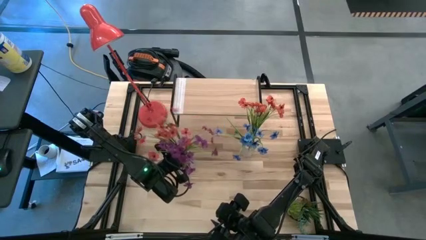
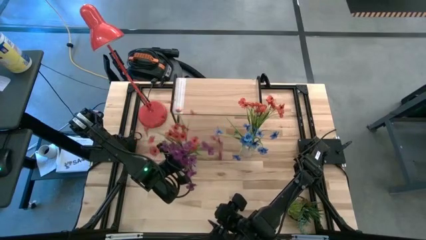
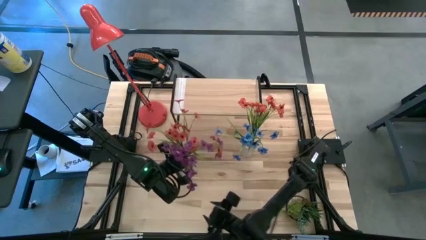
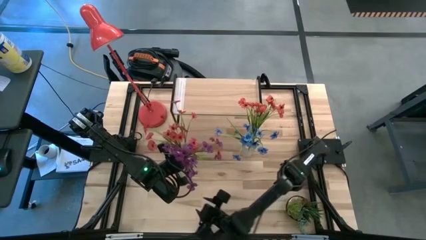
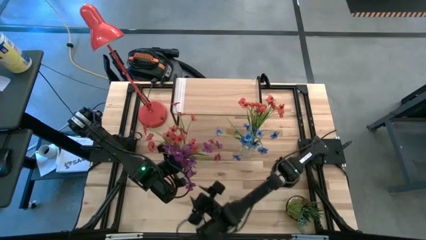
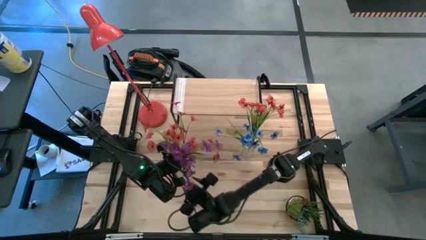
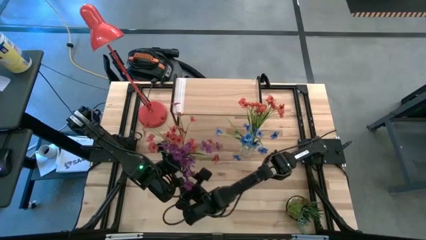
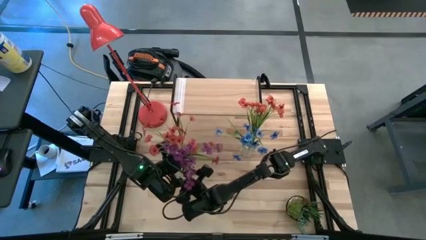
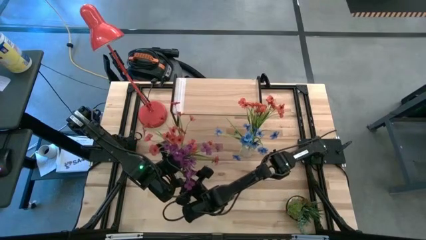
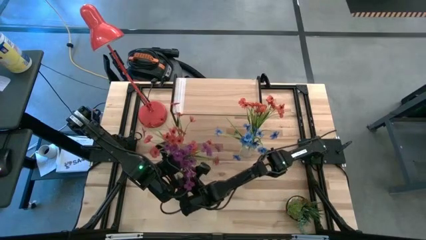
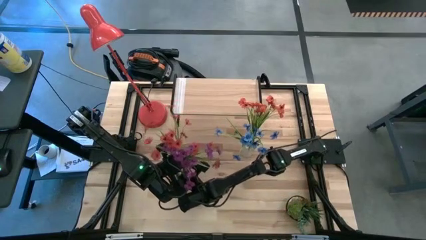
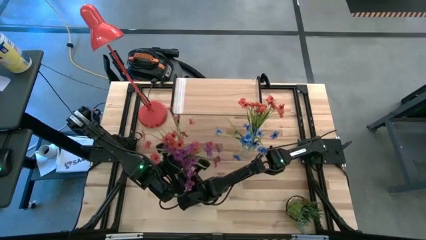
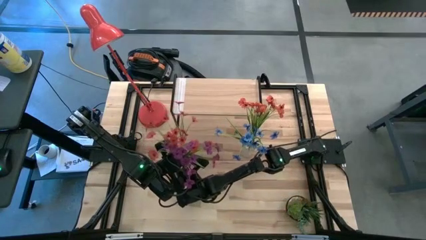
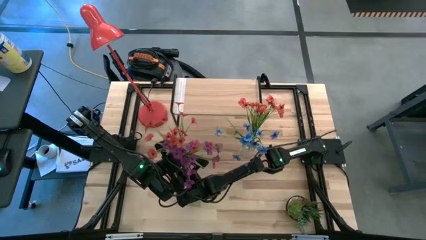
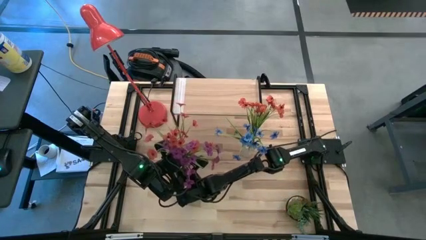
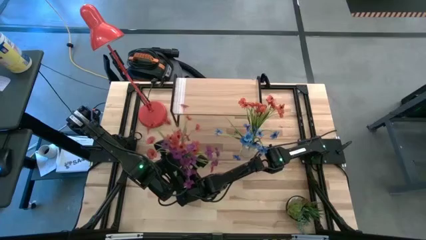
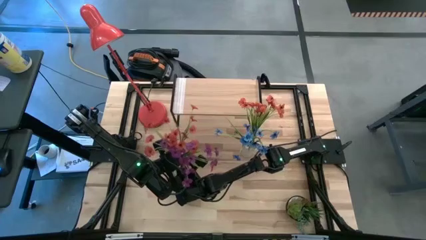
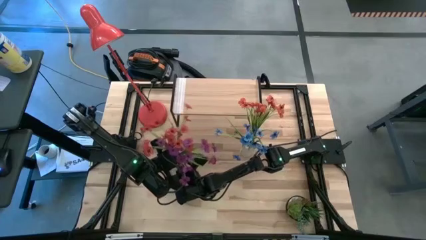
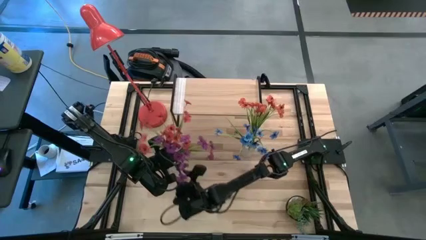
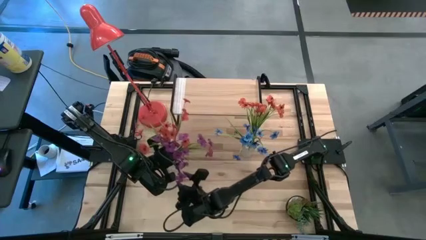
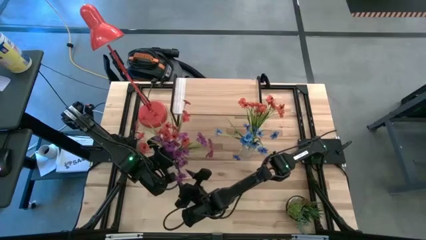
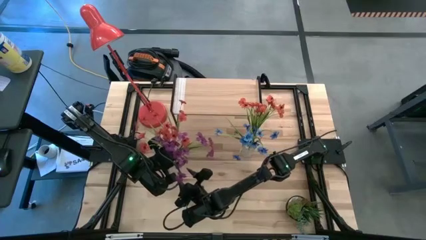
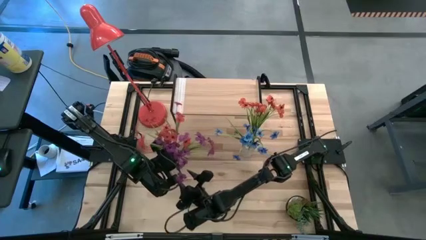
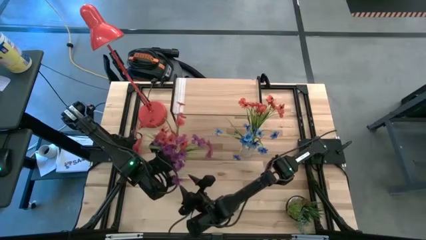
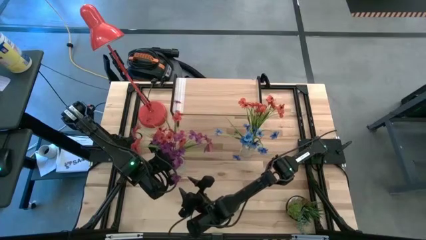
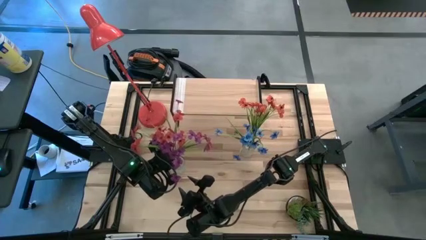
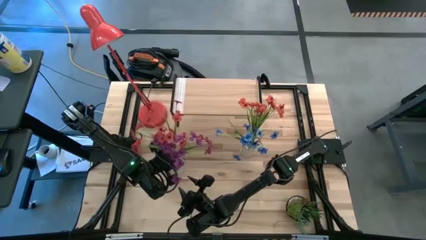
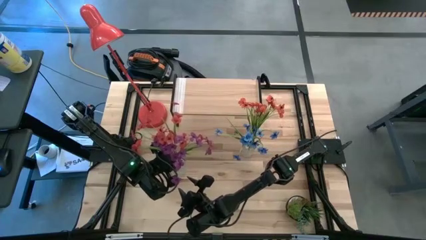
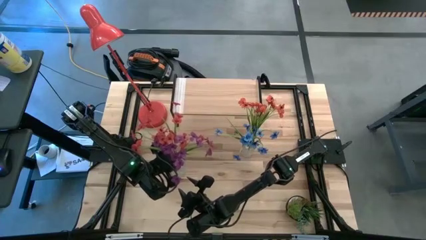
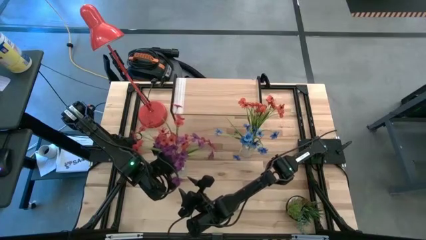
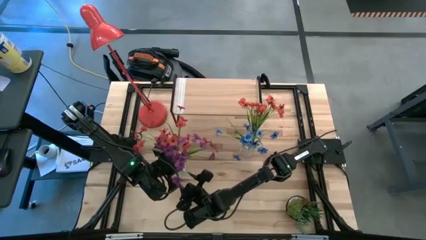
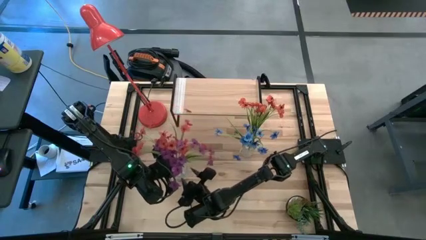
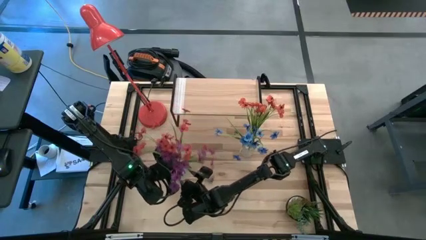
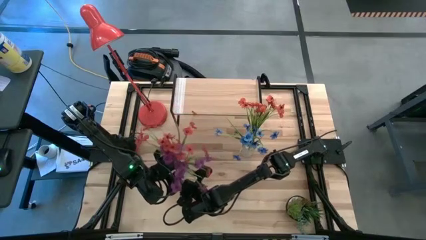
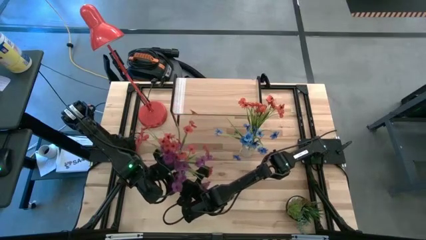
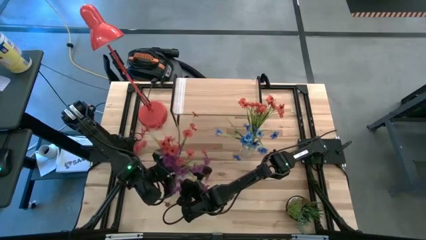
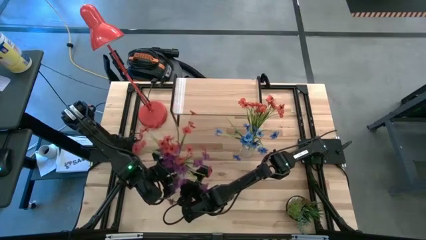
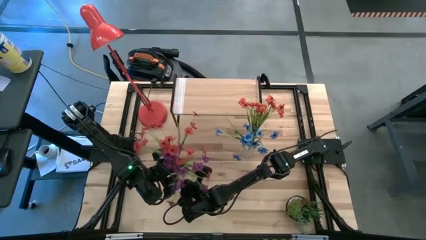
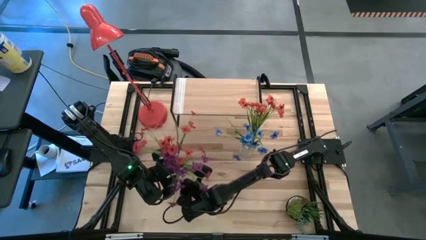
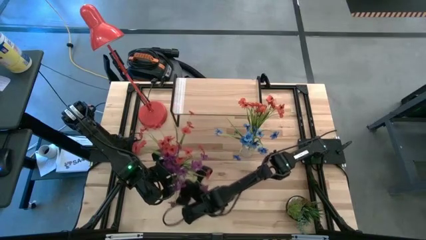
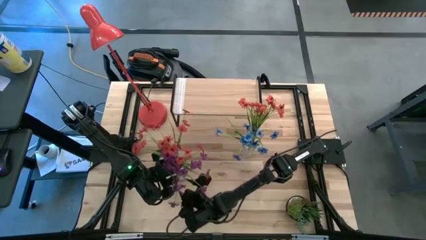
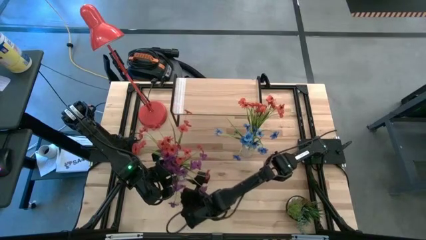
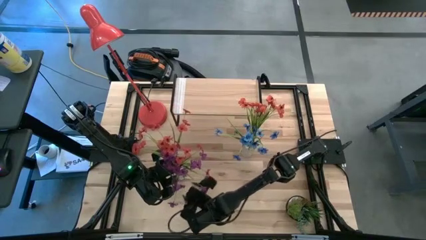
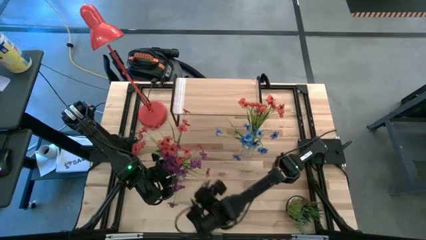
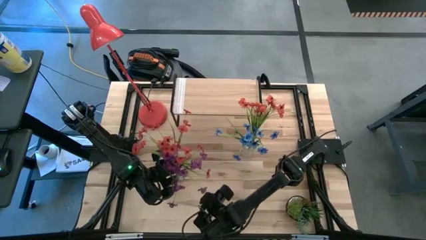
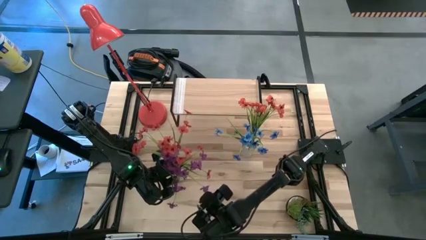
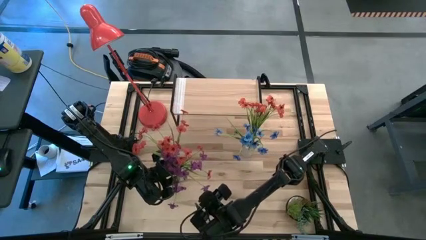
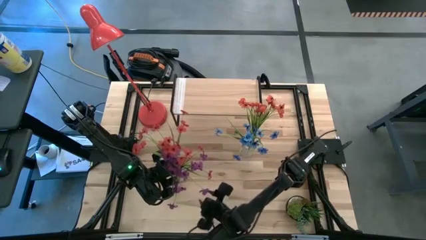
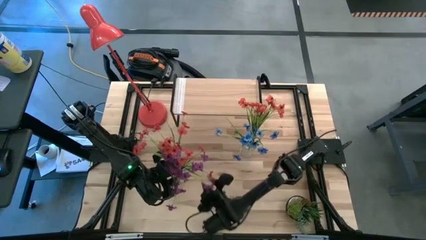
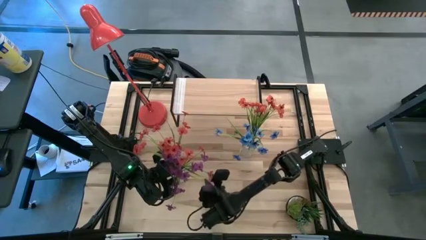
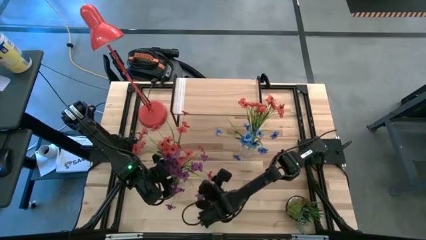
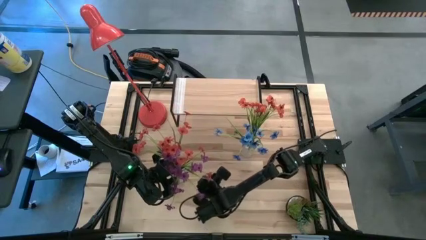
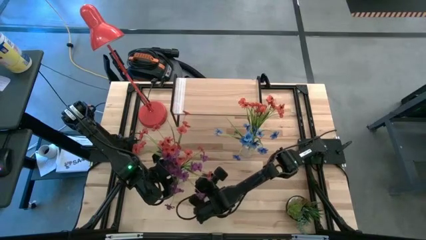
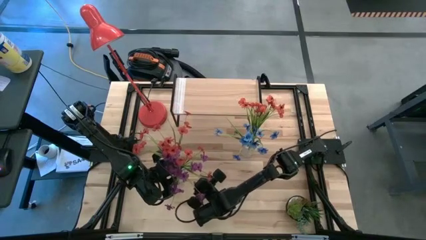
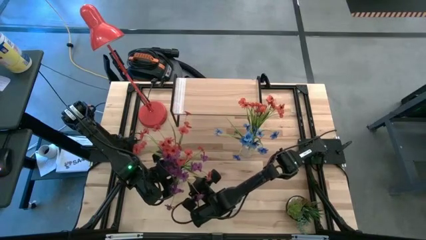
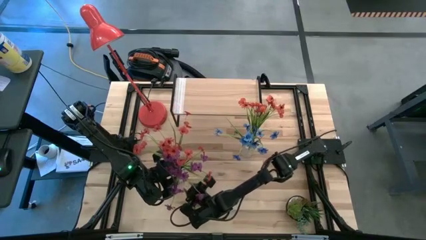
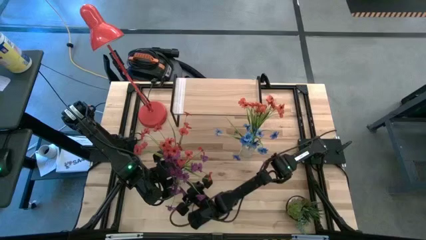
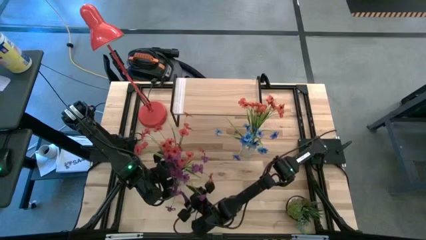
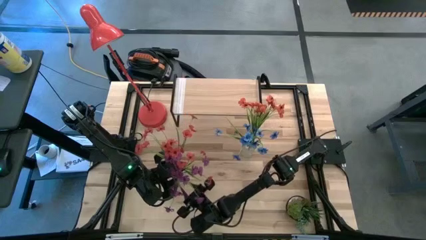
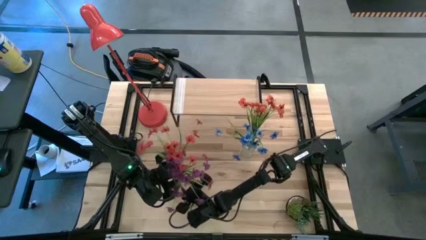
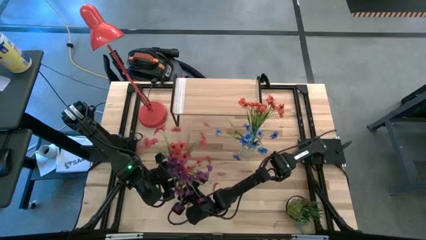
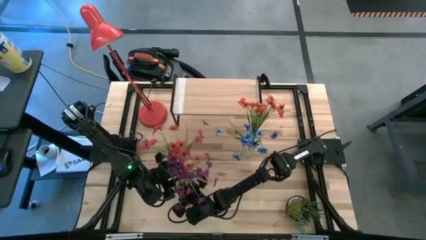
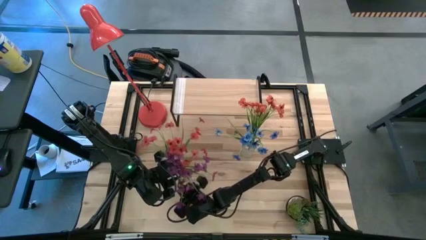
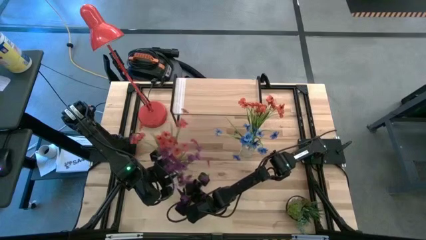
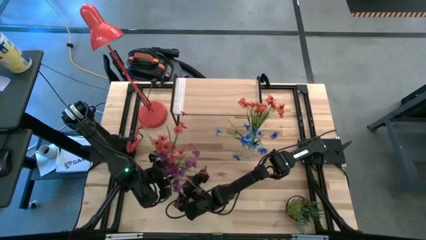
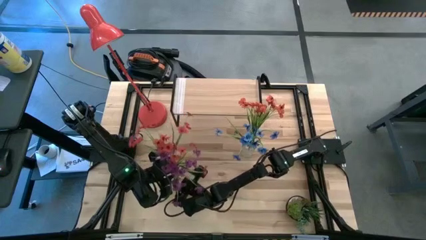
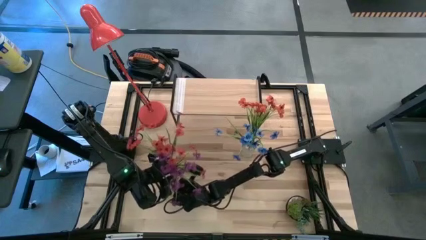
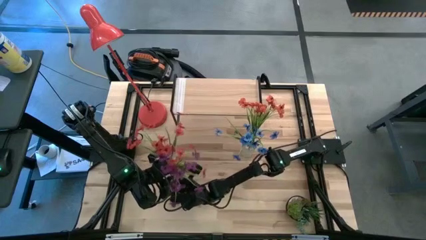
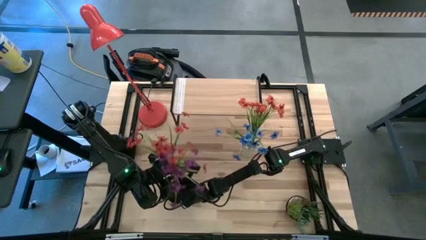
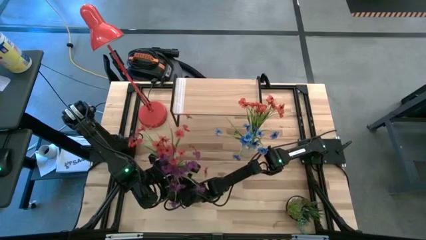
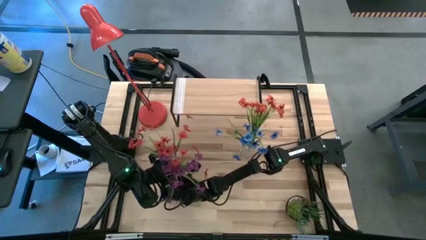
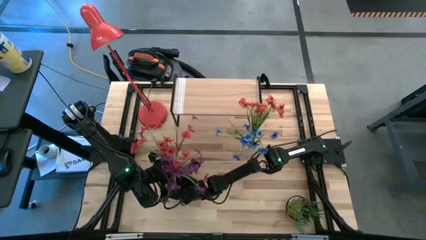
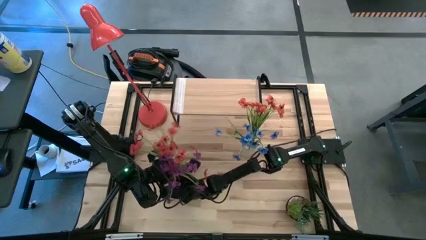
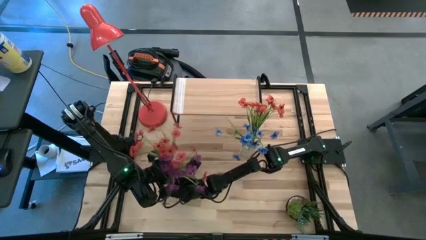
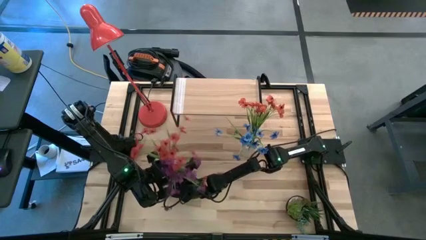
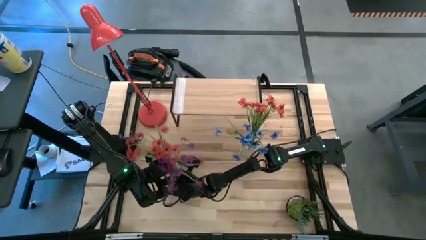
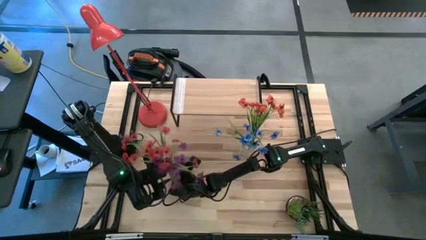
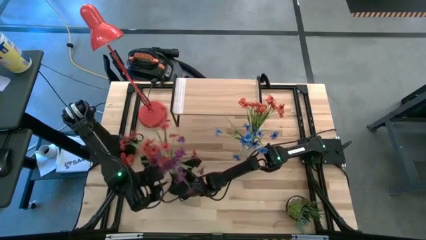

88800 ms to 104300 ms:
Task: Pick and place flowers into a vace then onto a shelf
Put the purple flowers into the left transparent flower vase
